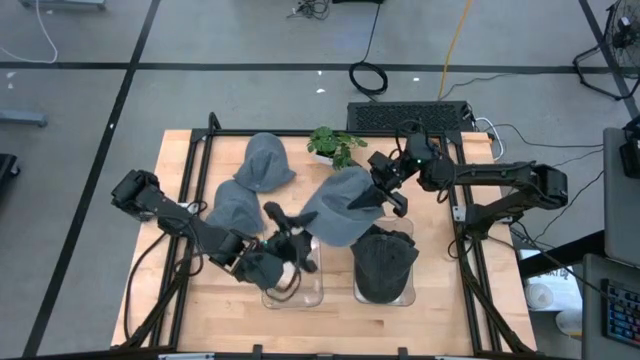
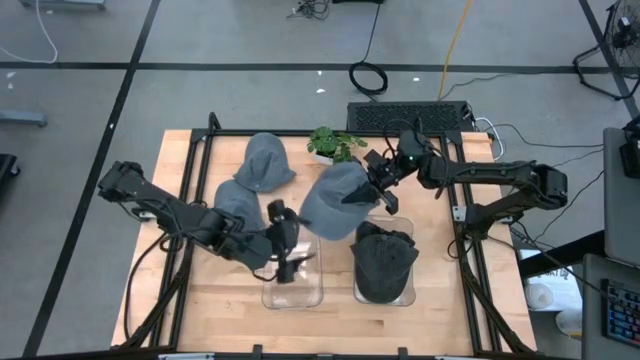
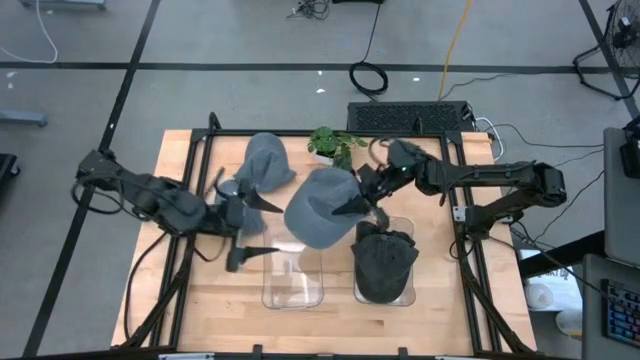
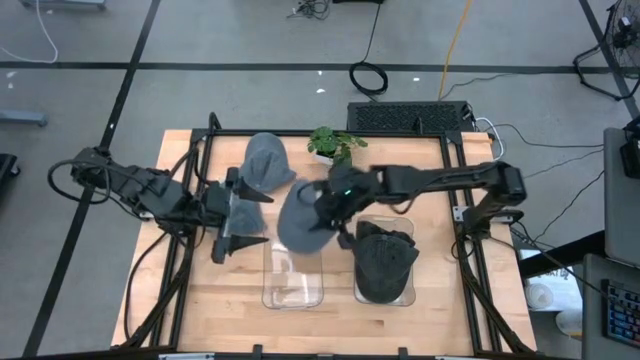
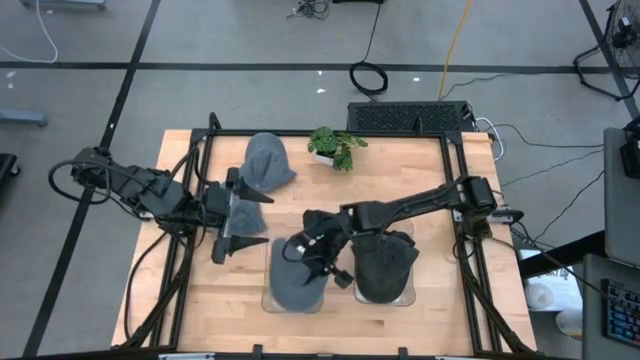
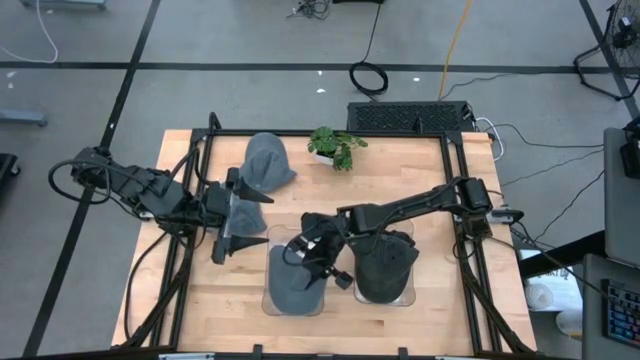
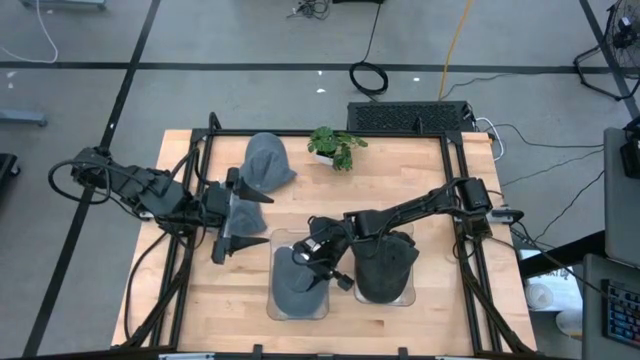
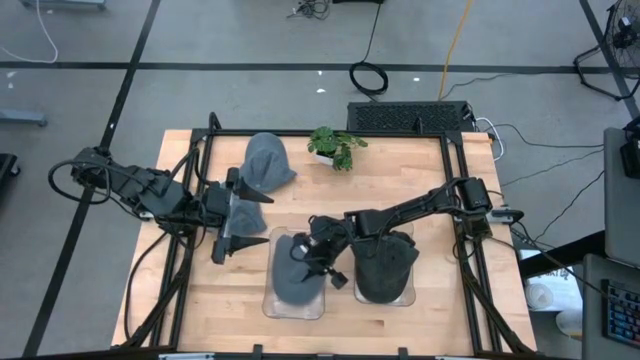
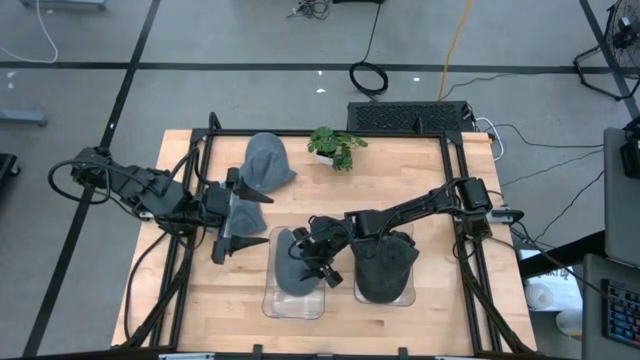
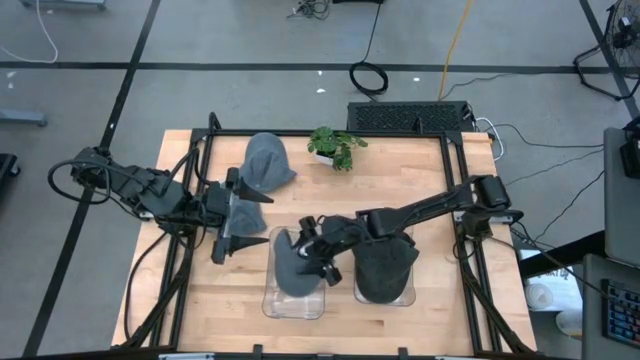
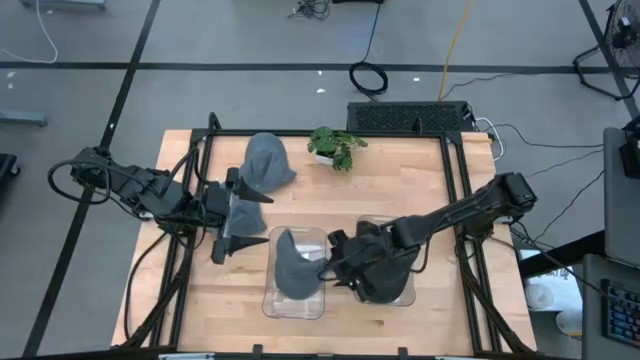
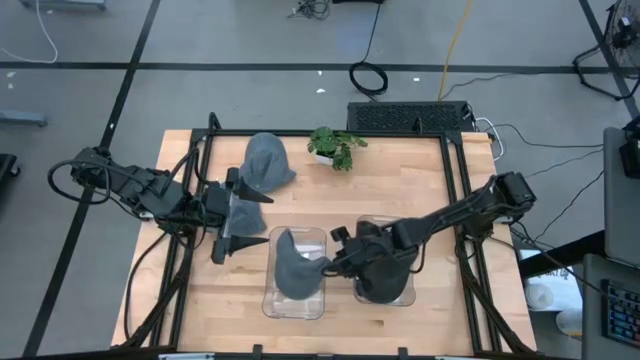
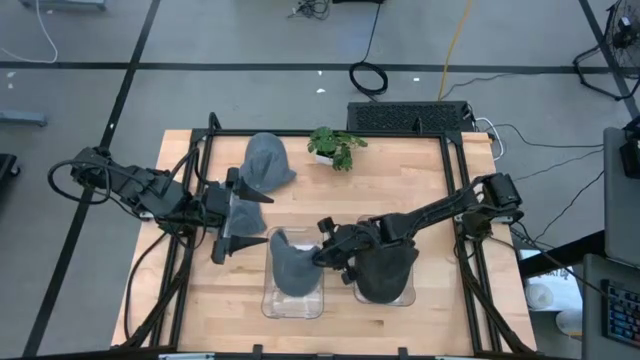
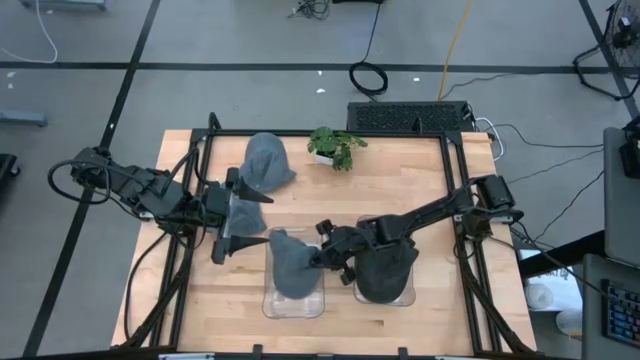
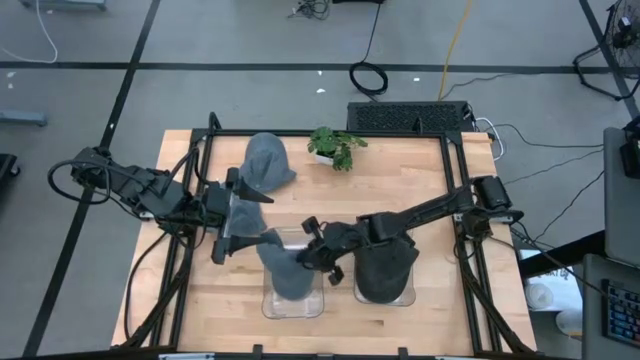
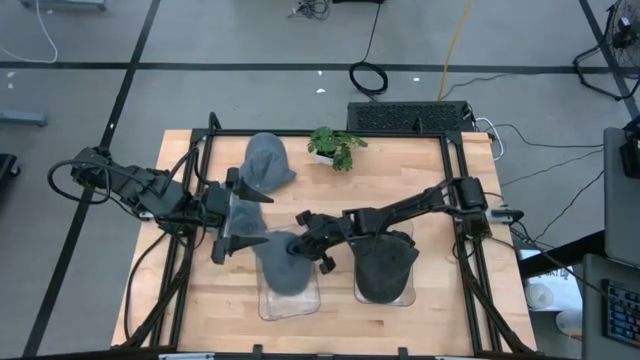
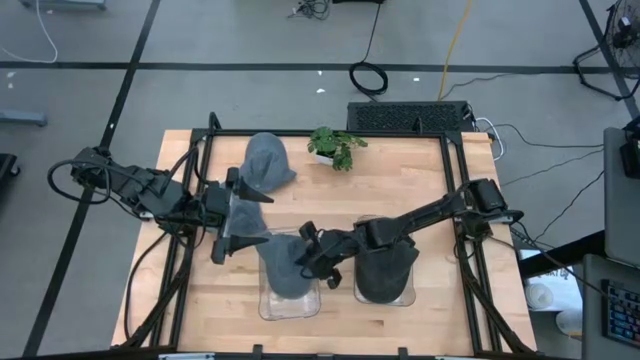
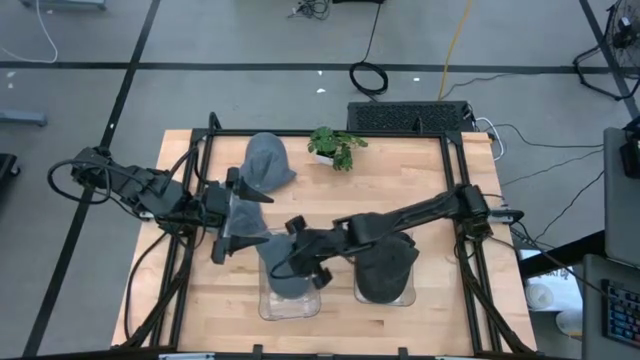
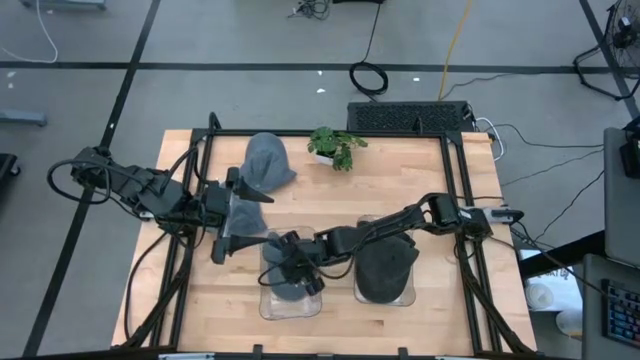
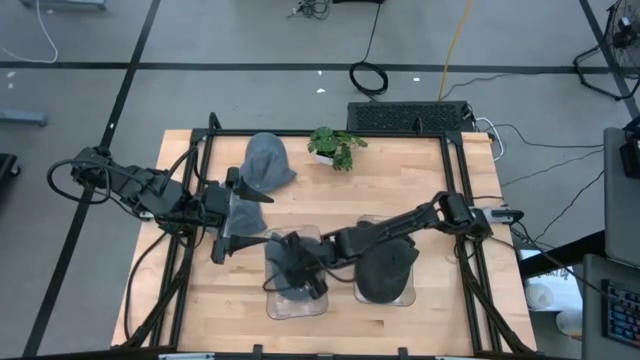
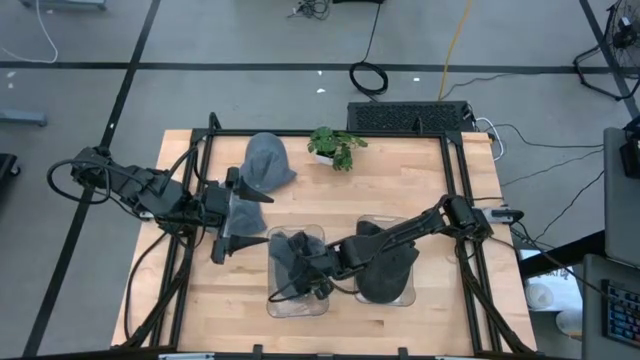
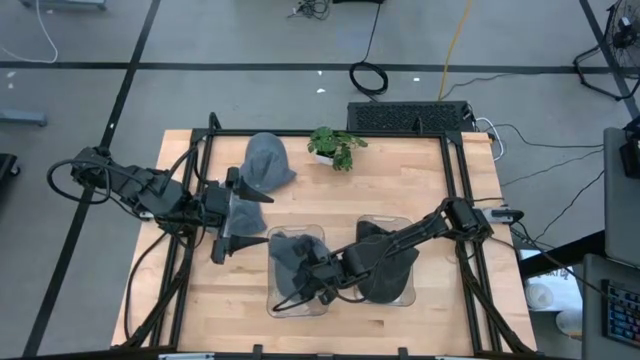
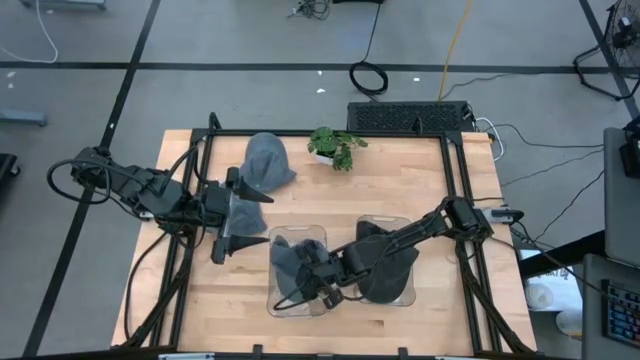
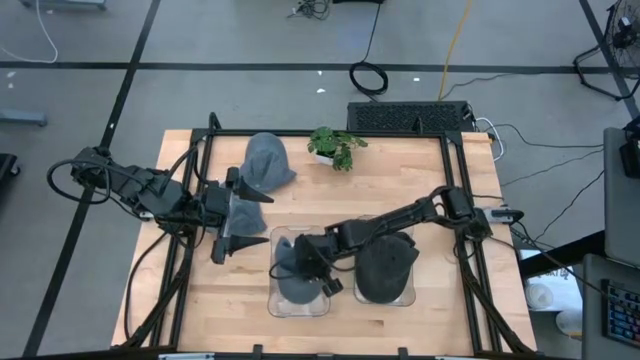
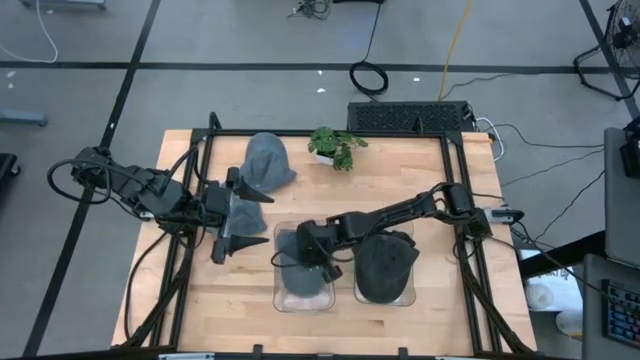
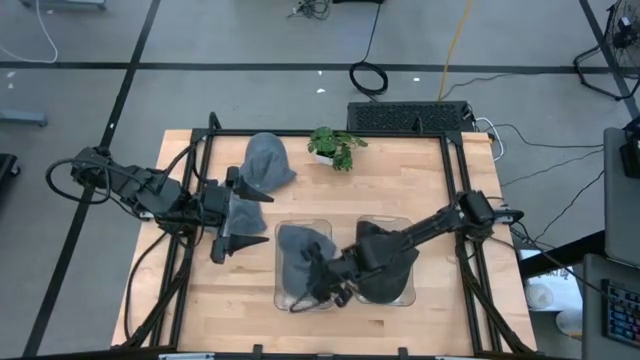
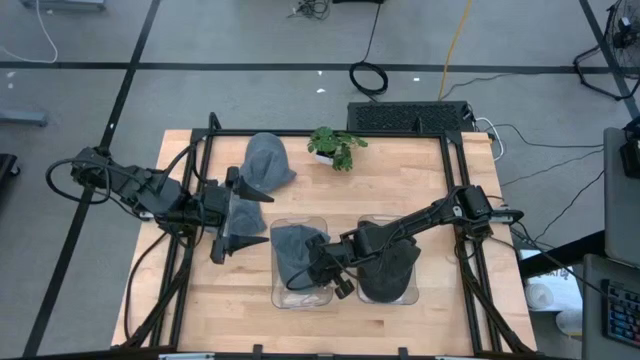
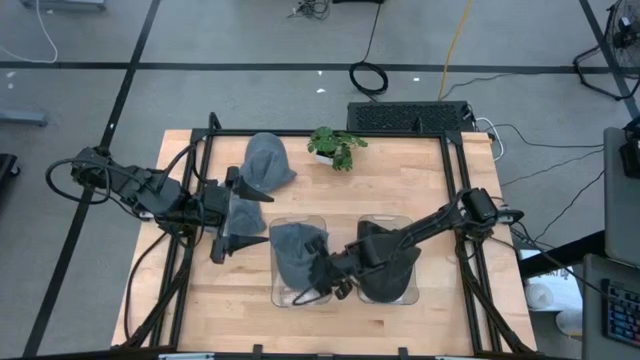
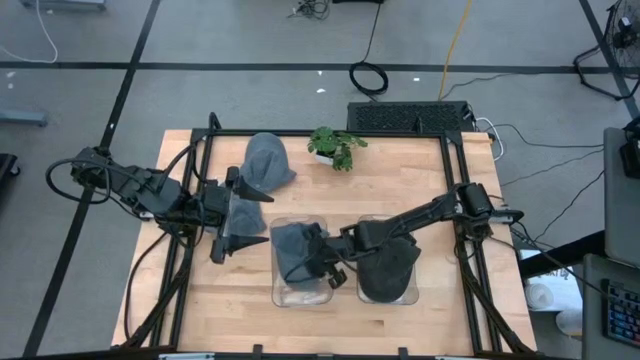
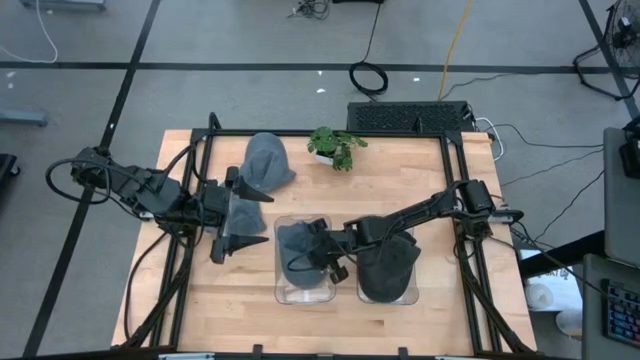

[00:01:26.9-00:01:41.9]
Task: Pick & Place hat
Put the bottom right gray cap into the left transparent bin

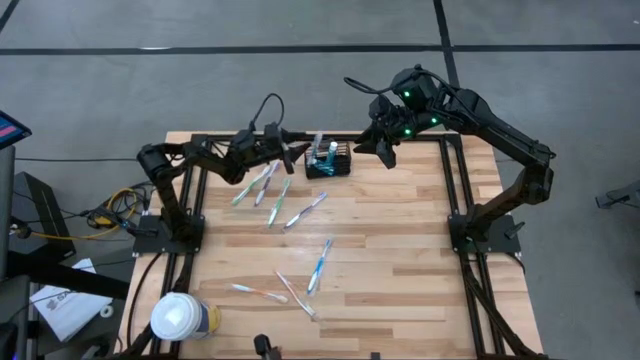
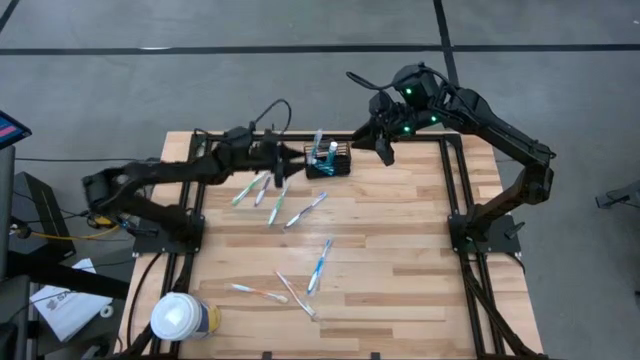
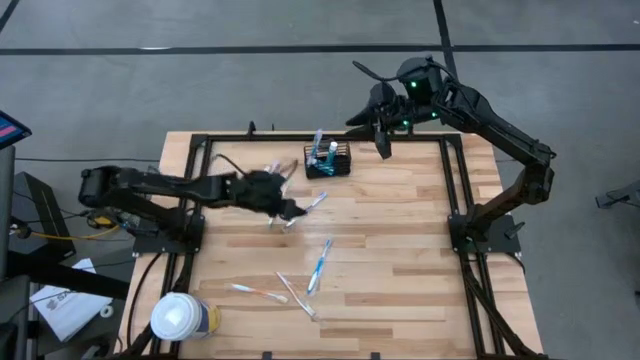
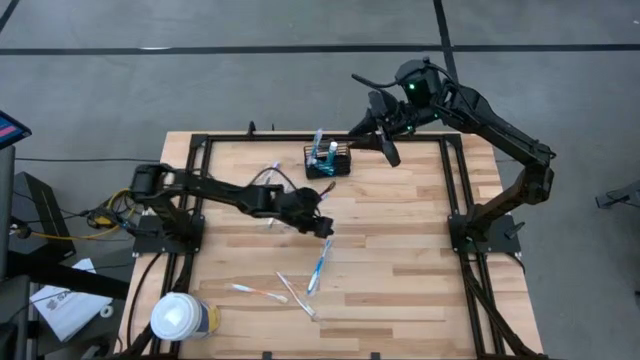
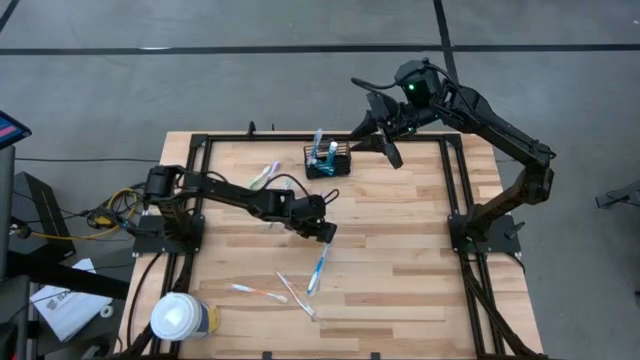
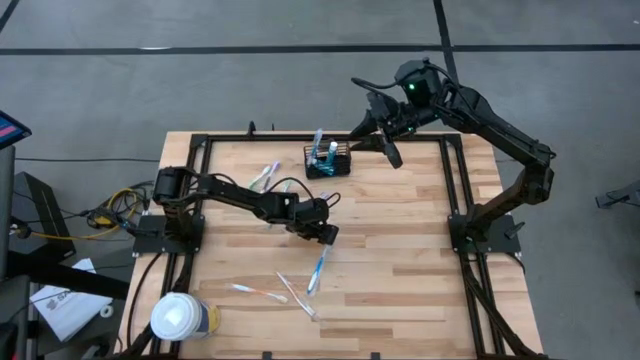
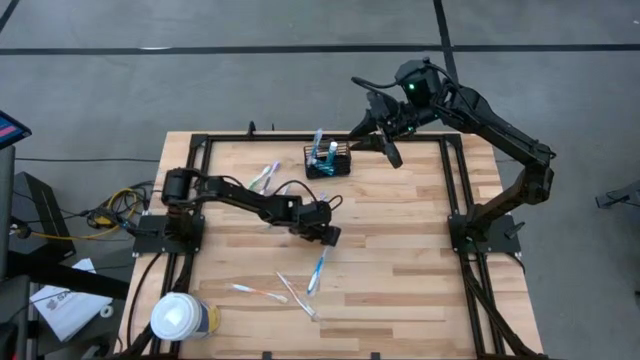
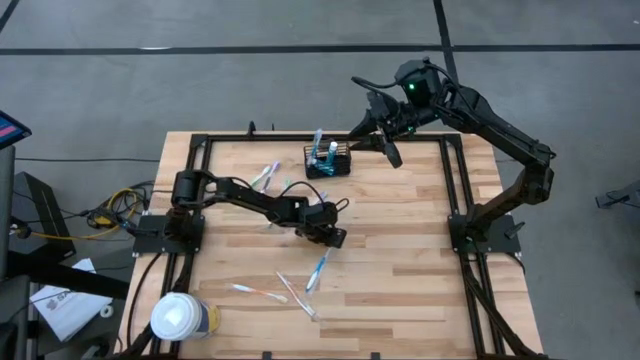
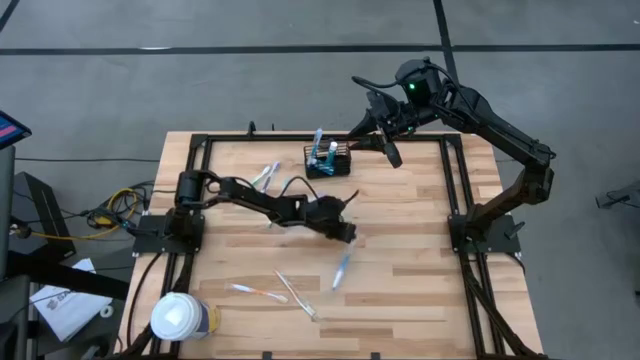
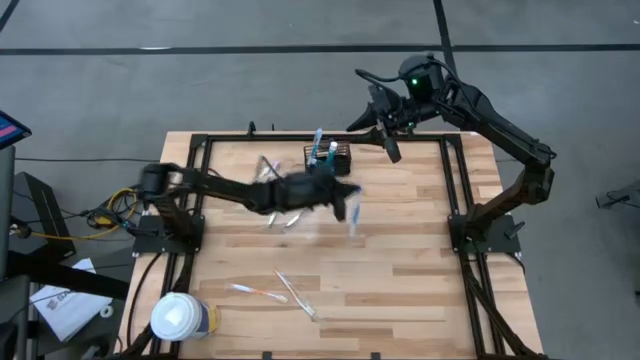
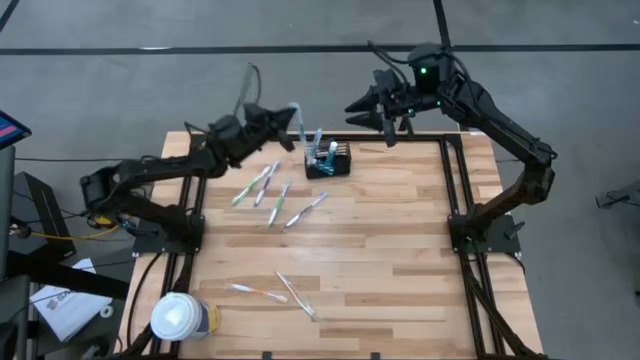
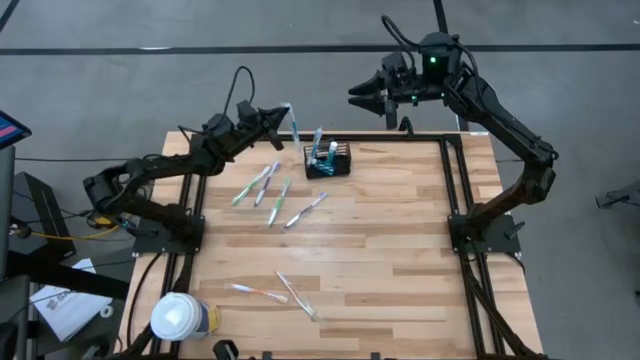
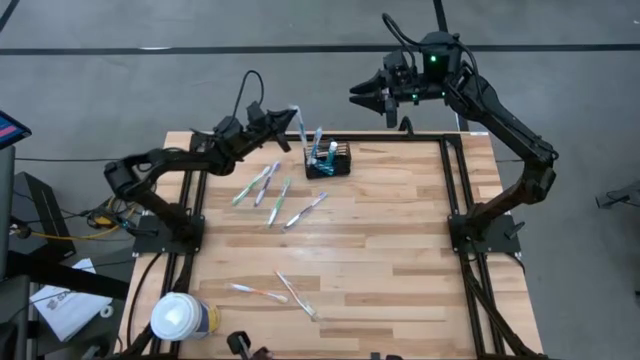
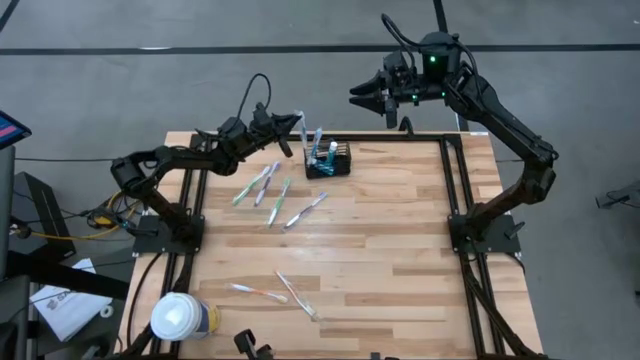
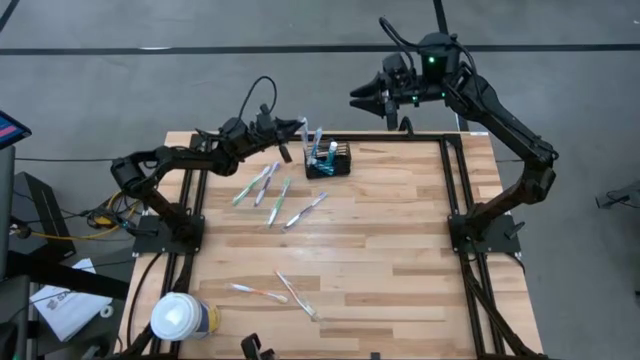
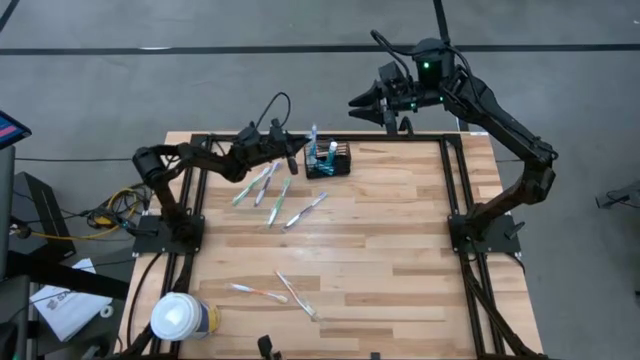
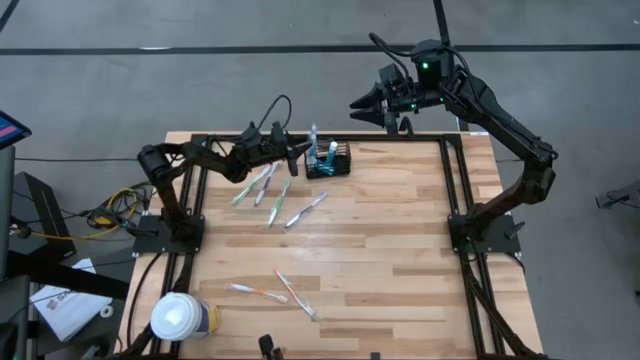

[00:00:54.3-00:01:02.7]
Task: Pick & Place toothbrushing station
Put the blue toothbrush into the black wire organizer
